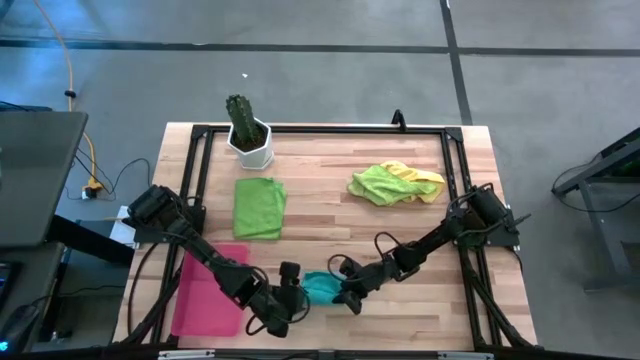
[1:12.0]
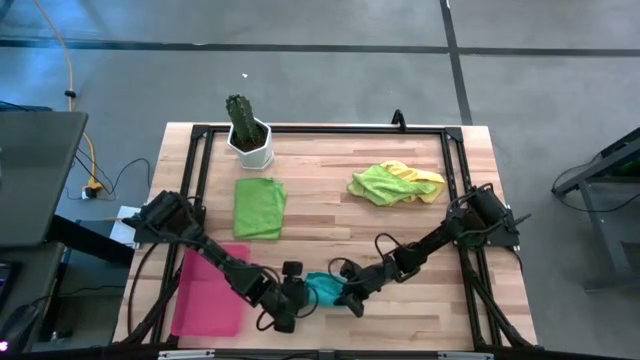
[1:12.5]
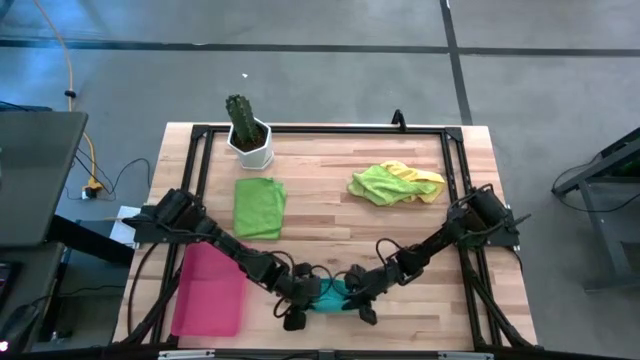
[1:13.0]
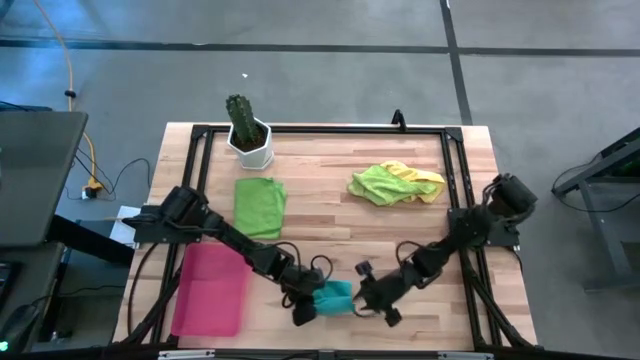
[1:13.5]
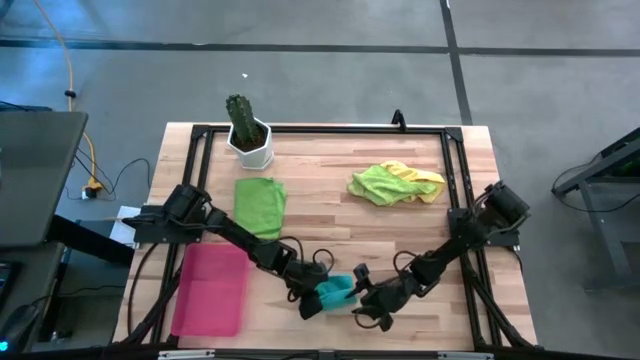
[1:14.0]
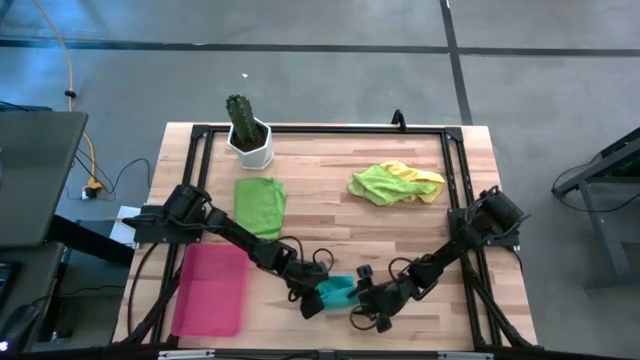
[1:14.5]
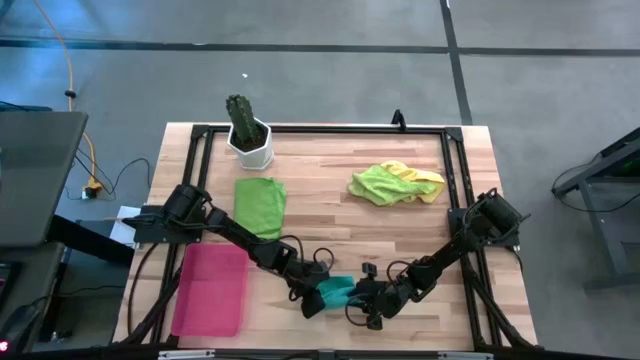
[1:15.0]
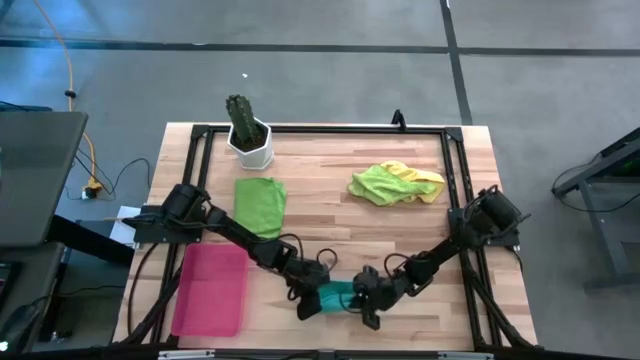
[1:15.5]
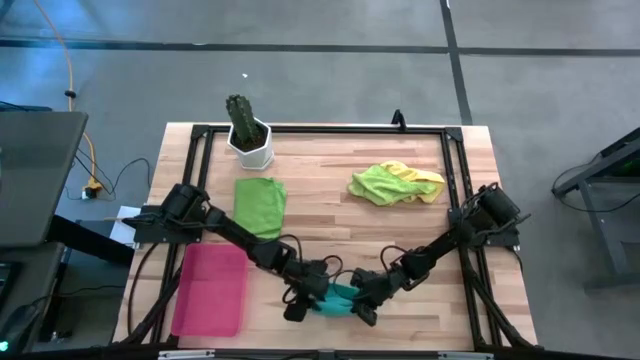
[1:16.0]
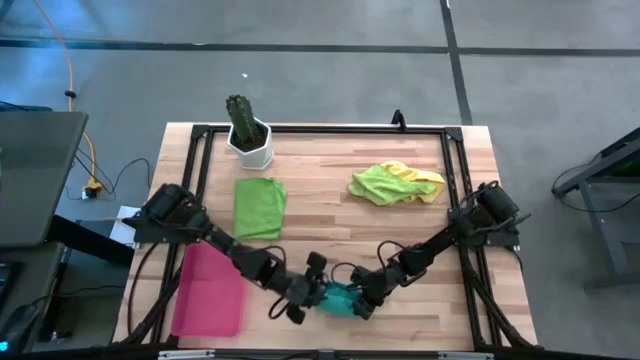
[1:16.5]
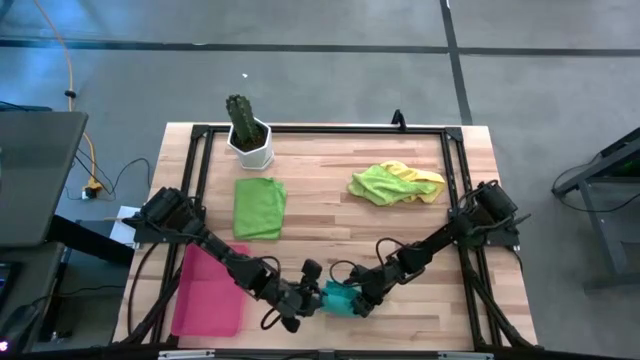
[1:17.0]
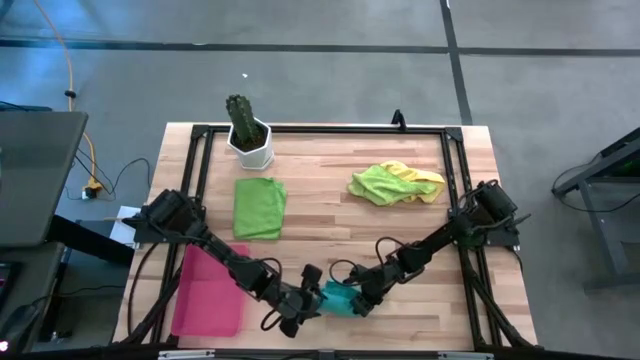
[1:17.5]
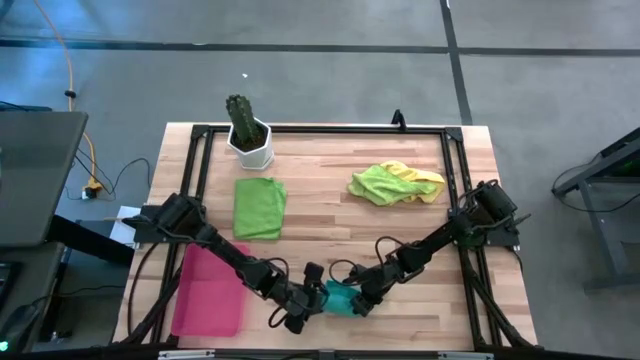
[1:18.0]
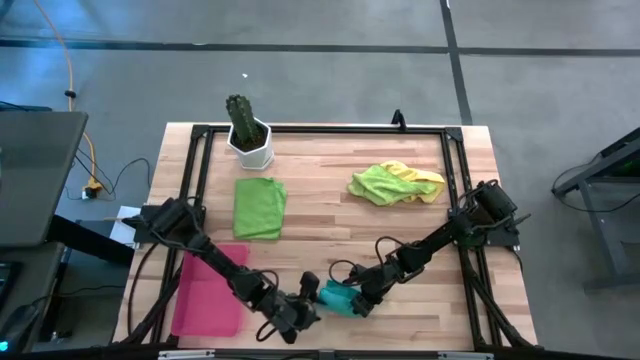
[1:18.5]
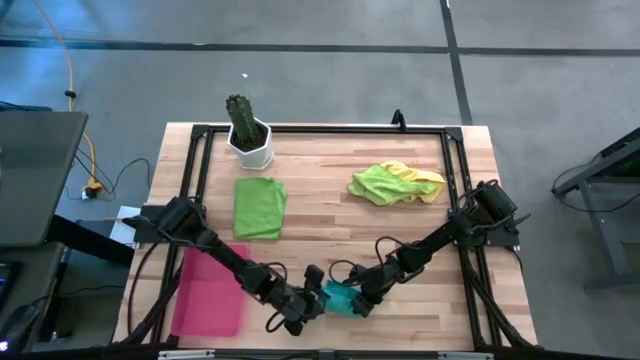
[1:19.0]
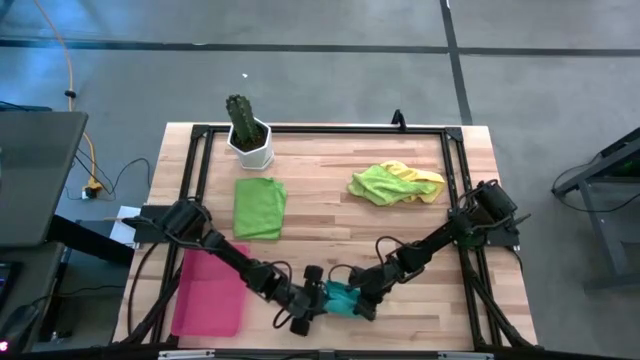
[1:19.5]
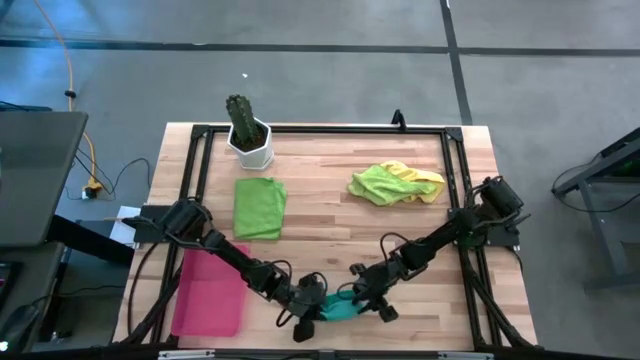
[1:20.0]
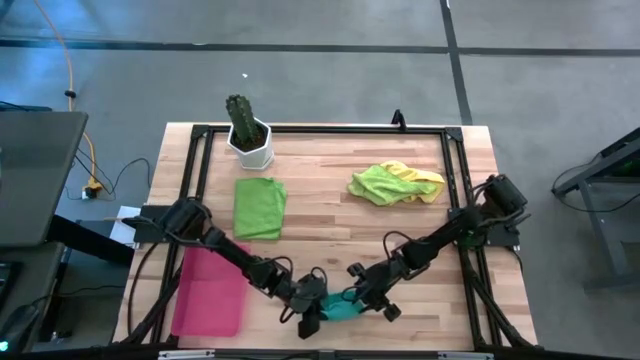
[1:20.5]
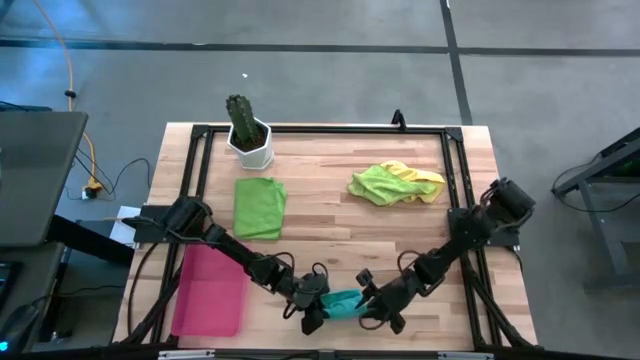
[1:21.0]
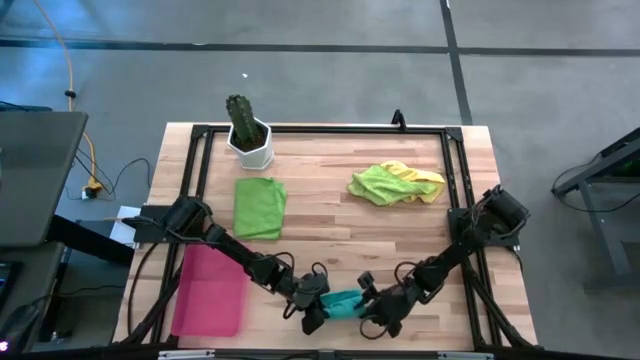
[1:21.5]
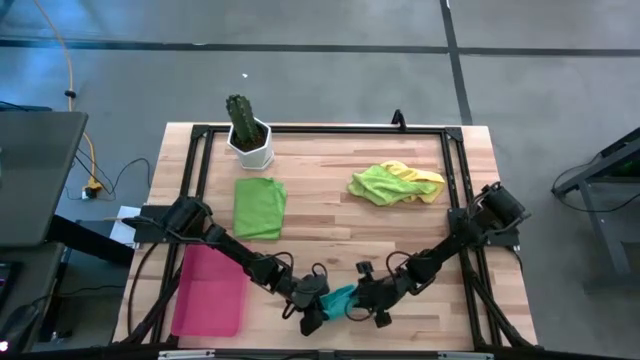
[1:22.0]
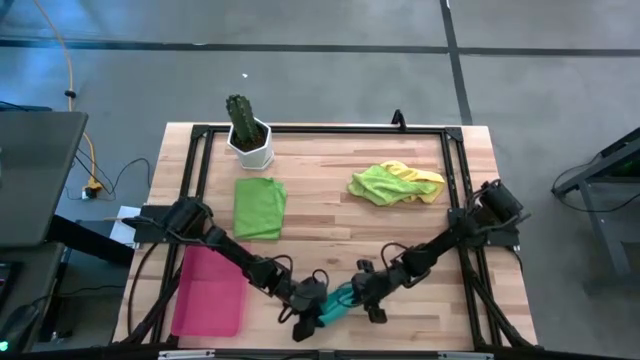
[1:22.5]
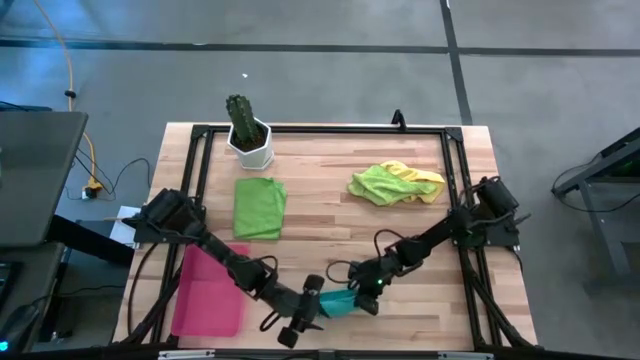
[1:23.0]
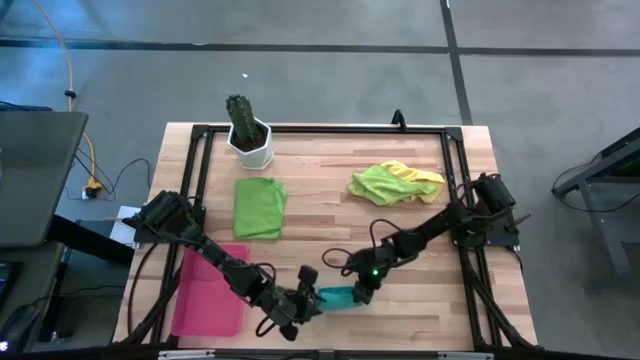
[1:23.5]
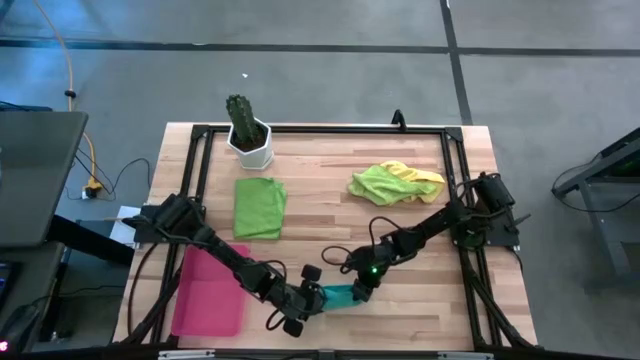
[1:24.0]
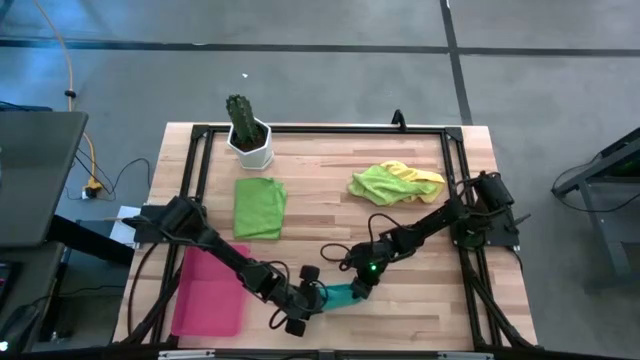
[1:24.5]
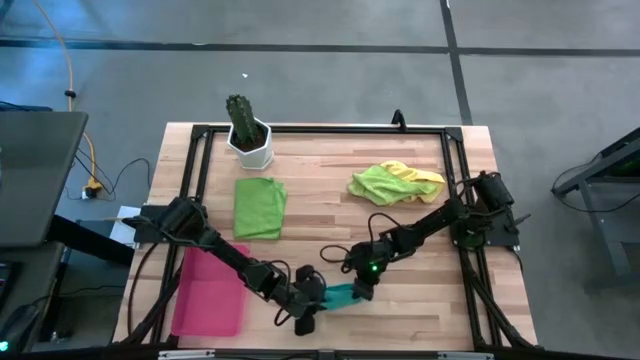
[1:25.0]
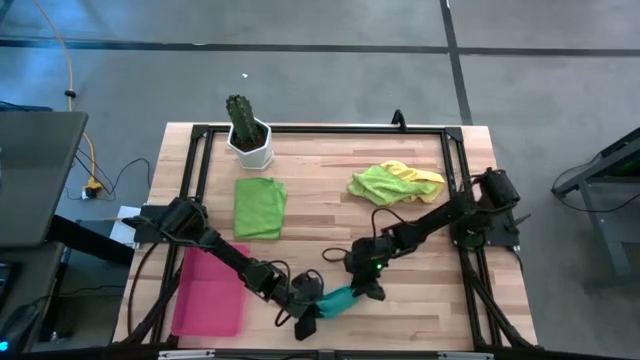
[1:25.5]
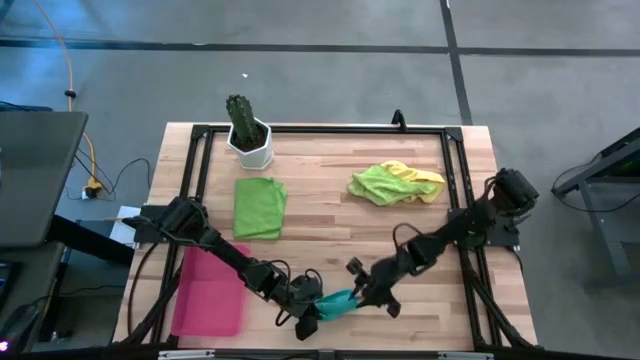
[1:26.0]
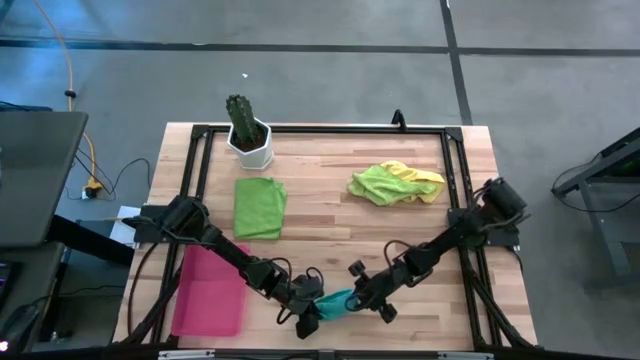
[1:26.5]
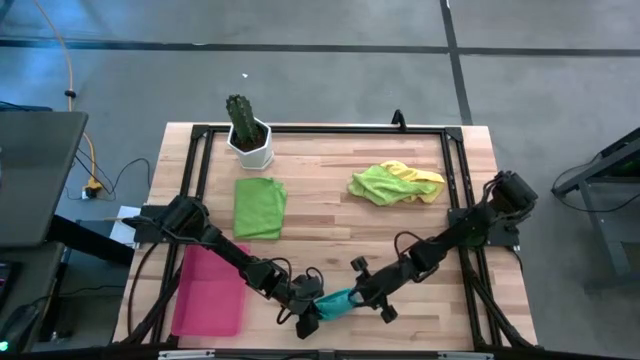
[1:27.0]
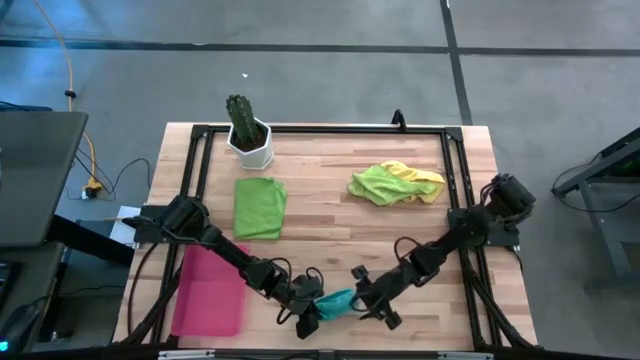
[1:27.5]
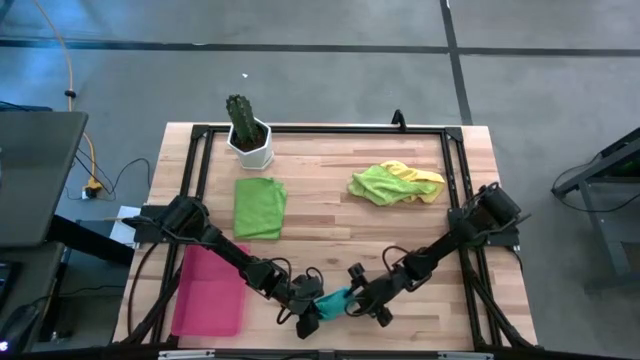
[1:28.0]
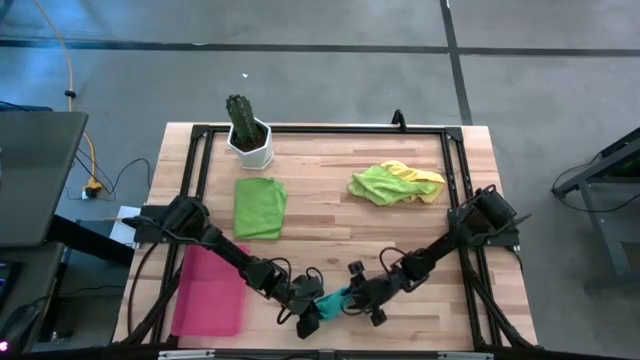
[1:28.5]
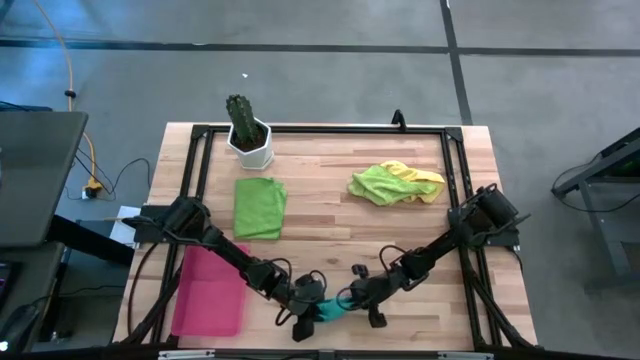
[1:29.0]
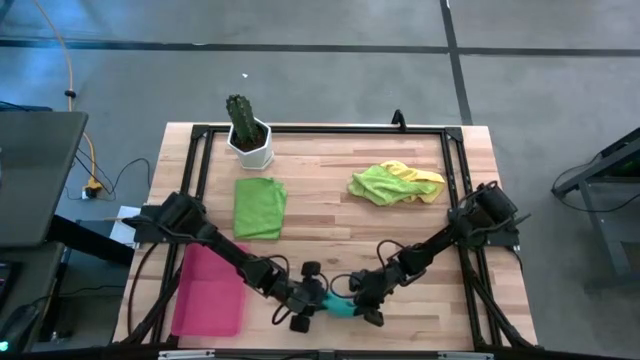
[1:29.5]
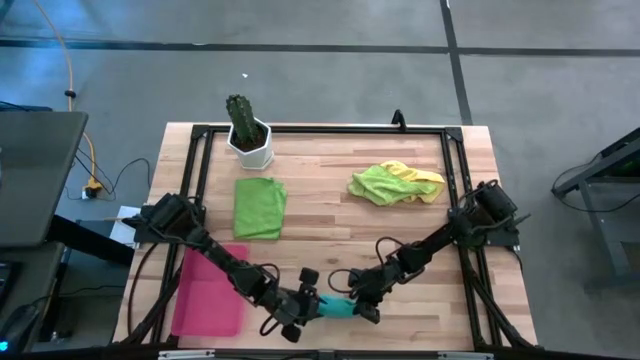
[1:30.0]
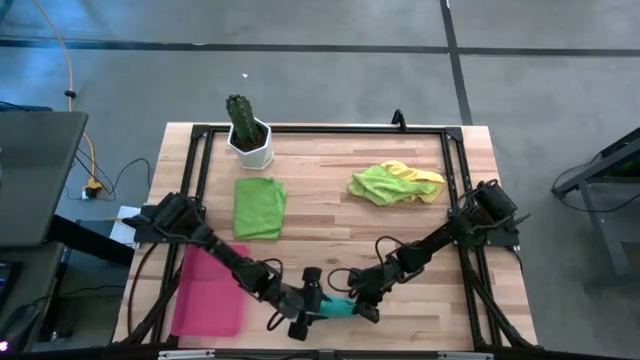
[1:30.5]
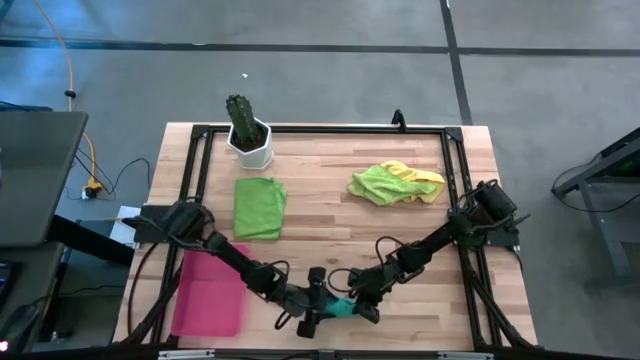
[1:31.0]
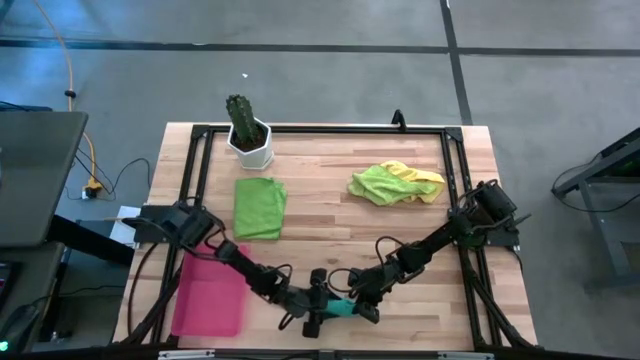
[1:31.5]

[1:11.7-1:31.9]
Task: Roll microfiber towels into tight, uniform cylinder then place into a basket
Roll the blue towel
